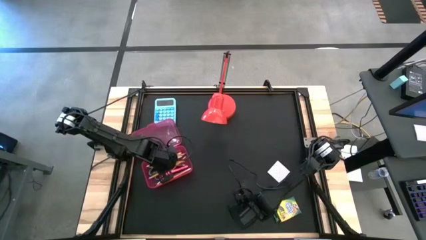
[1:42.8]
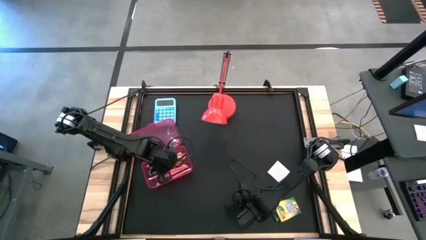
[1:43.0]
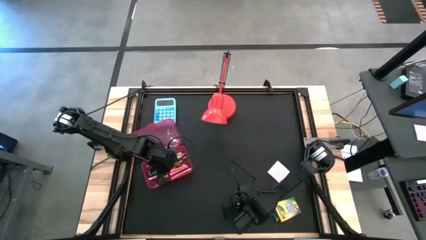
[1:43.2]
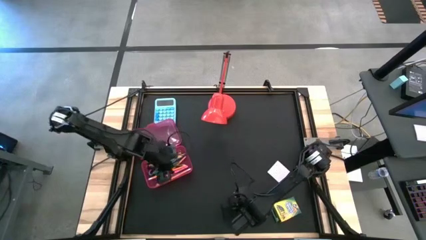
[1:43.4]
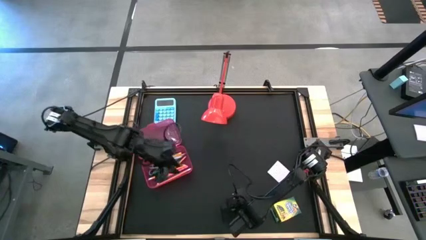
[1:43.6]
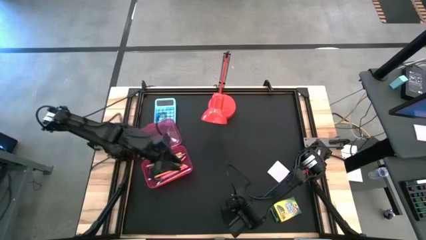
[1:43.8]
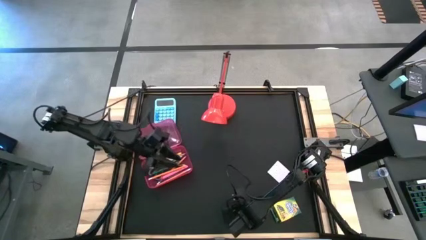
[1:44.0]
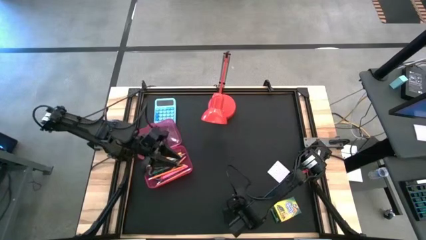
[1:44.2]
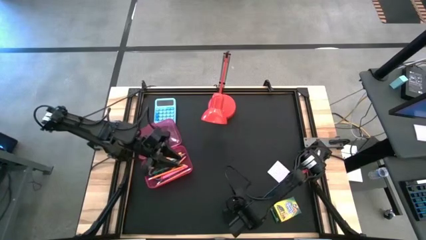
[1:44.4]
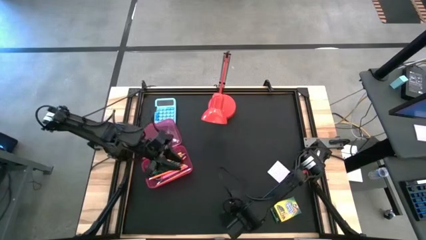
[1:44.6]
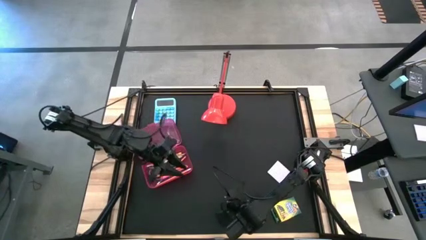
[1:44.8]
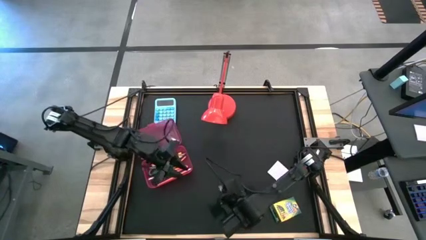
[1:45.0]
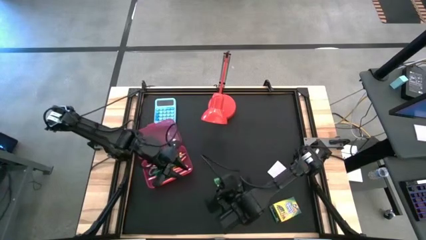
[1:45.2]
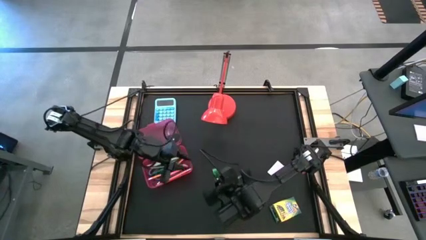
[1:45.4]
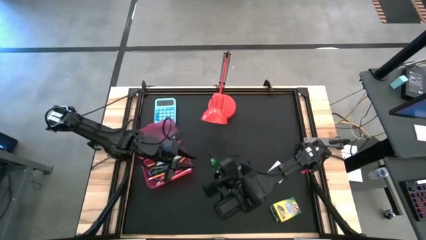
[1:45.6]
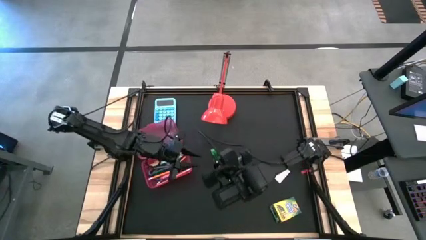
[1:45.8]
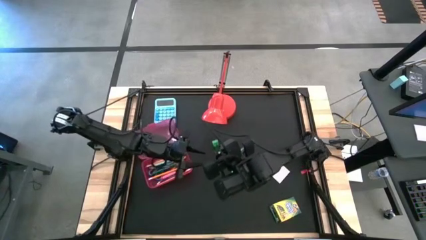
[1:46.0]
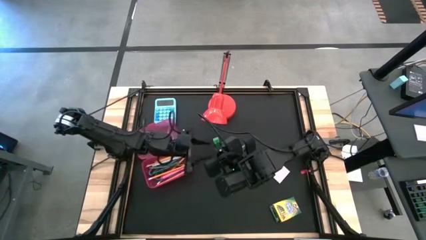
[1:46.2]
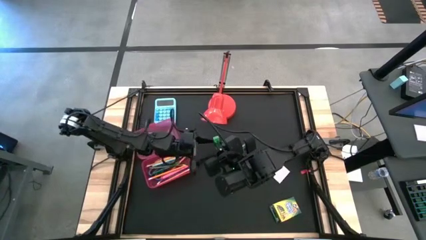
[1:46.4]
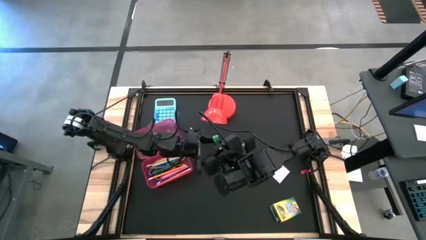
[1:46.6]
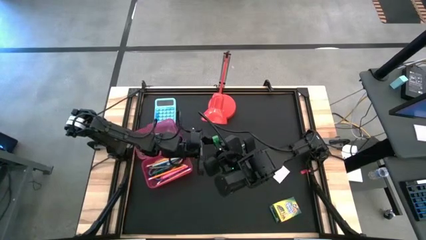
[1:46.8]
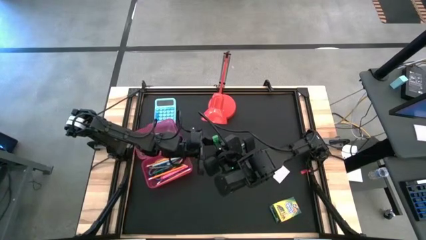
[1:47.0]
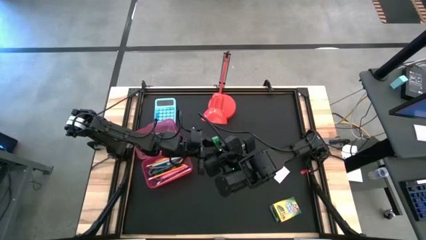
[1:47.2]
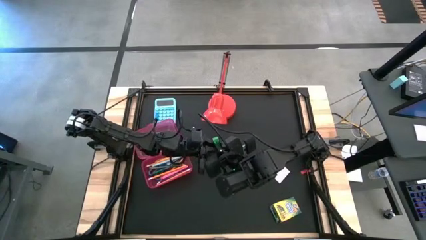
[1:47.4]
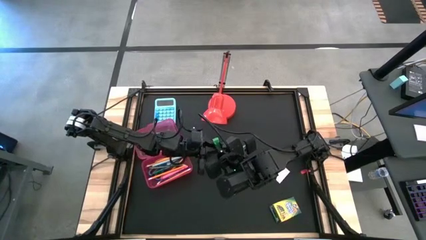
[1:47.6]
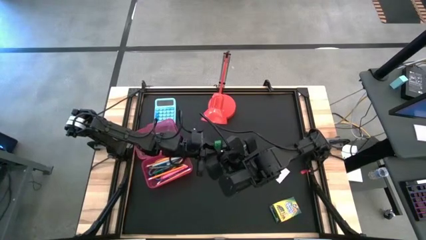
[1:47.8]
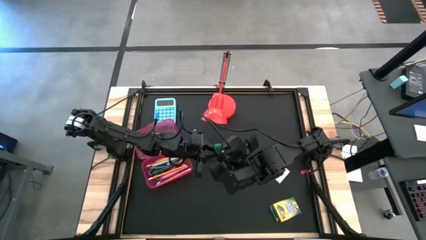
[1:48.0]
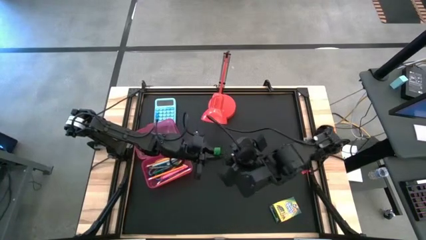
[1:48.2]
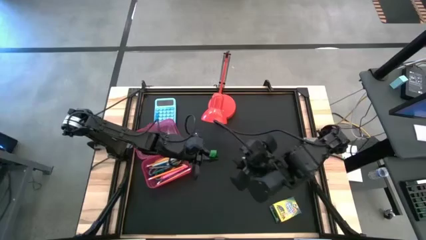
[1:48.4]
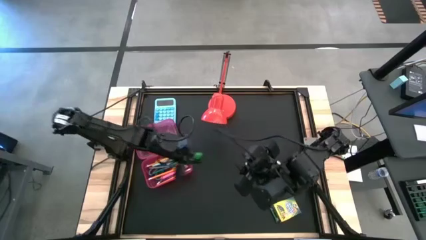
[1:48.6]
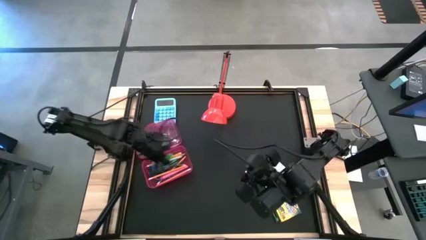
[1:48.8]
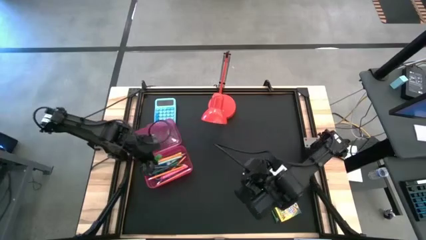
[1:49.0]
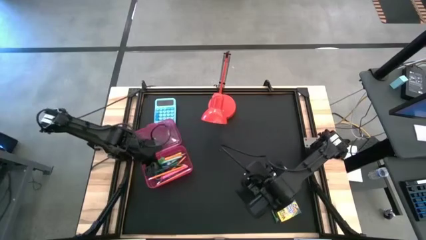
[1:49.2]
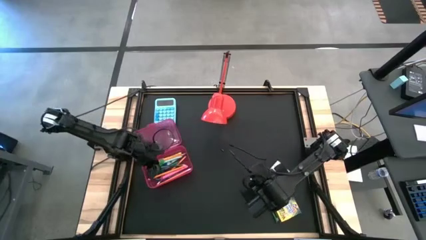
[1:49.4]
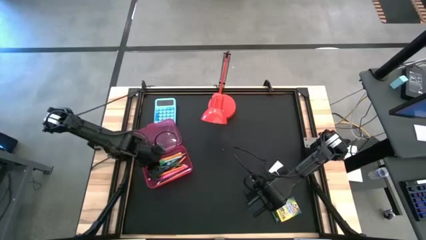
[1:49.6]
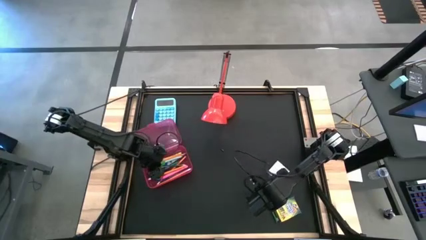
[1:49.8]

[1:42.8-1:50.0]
Task: Pack school essentials
Put the green eraser into the red supply box

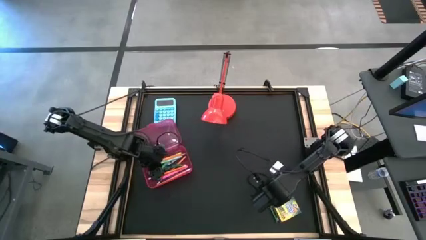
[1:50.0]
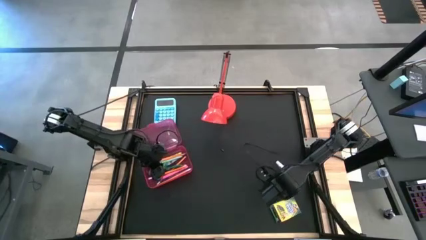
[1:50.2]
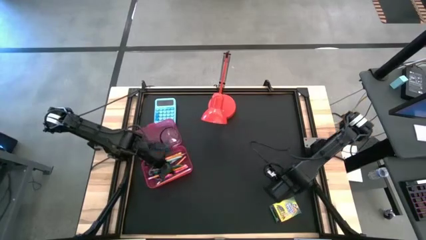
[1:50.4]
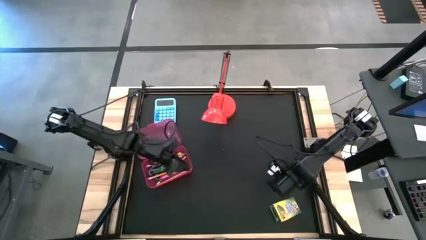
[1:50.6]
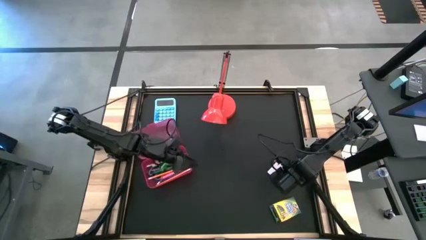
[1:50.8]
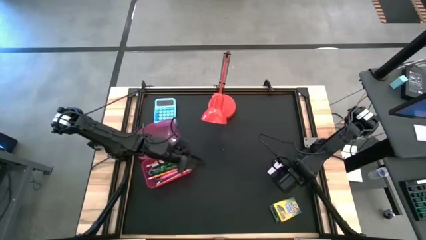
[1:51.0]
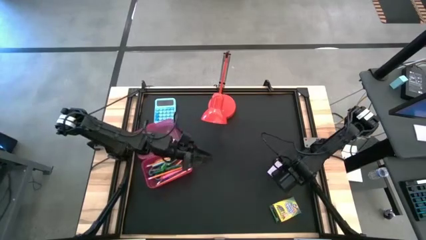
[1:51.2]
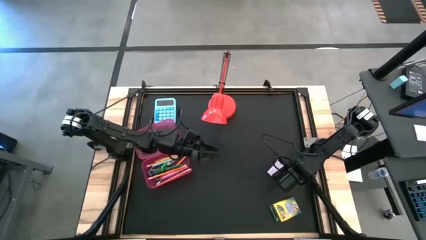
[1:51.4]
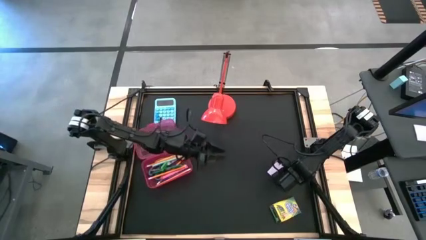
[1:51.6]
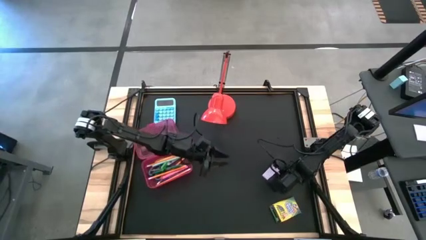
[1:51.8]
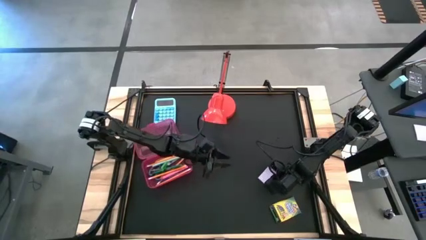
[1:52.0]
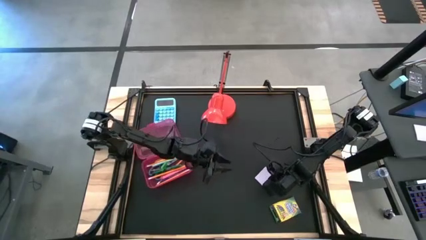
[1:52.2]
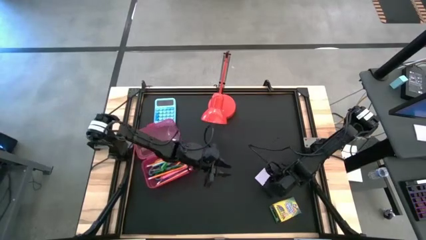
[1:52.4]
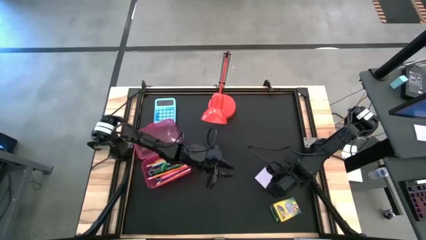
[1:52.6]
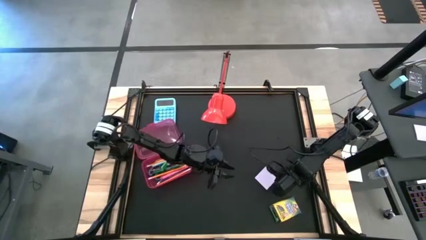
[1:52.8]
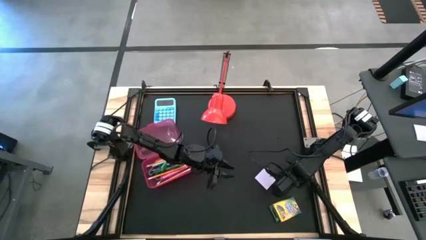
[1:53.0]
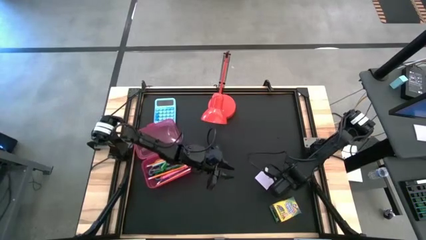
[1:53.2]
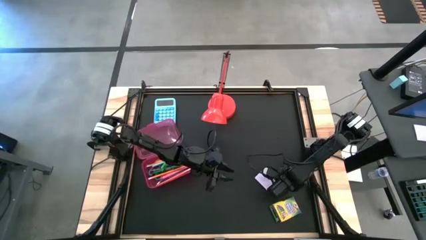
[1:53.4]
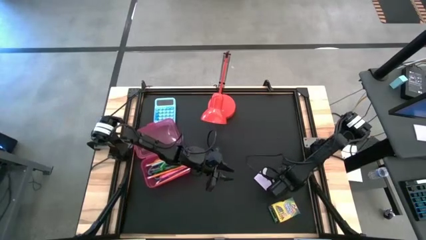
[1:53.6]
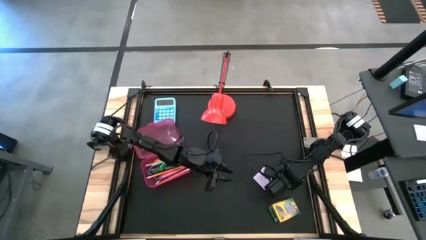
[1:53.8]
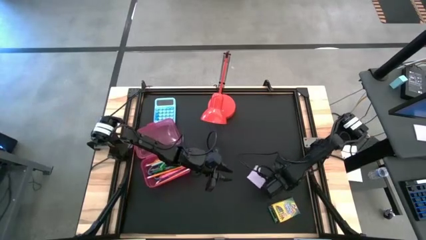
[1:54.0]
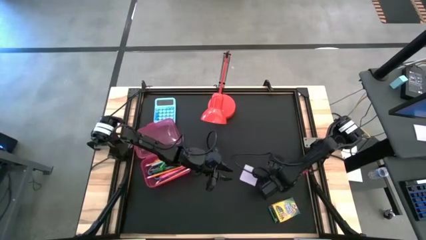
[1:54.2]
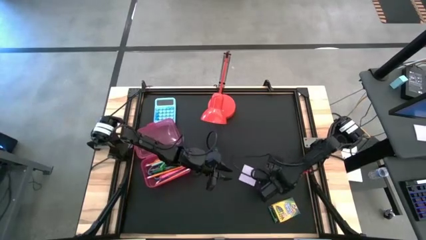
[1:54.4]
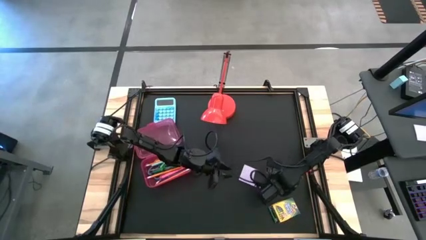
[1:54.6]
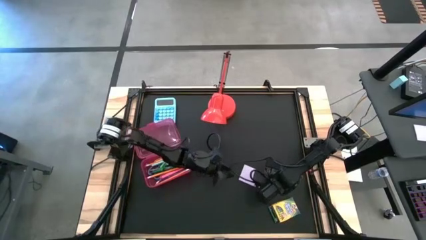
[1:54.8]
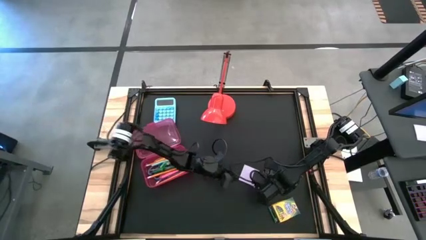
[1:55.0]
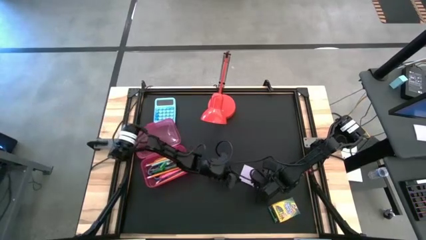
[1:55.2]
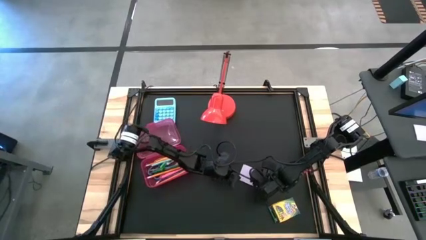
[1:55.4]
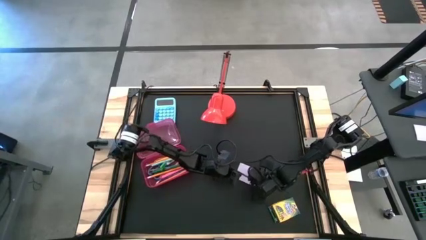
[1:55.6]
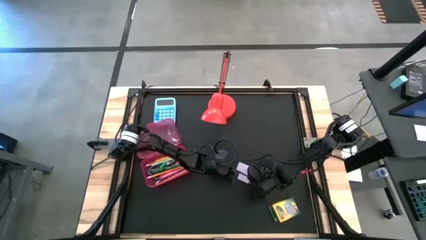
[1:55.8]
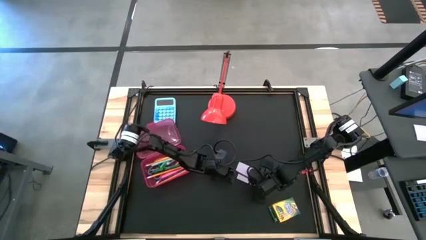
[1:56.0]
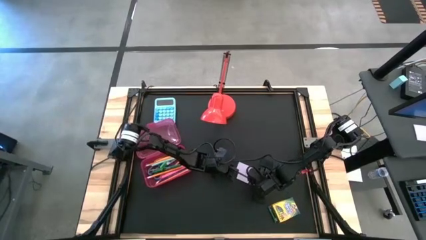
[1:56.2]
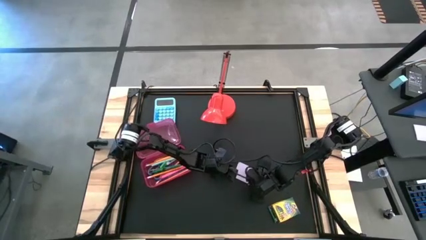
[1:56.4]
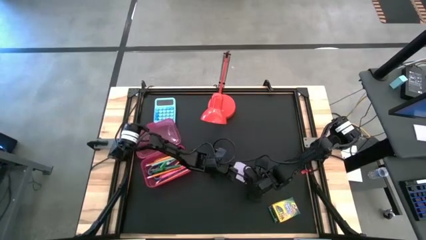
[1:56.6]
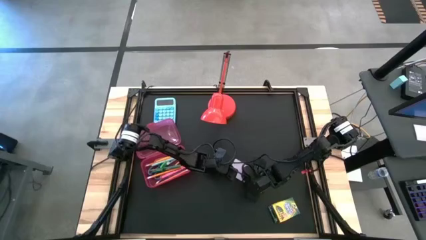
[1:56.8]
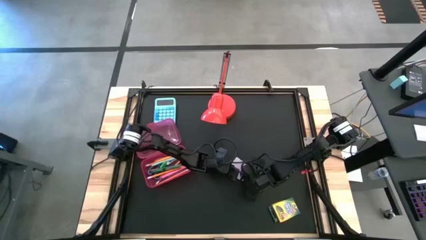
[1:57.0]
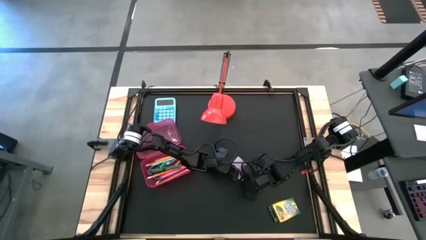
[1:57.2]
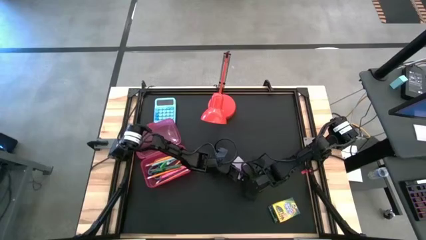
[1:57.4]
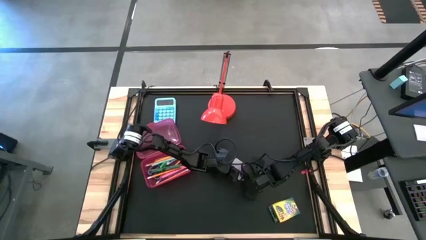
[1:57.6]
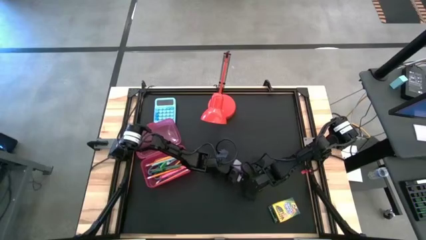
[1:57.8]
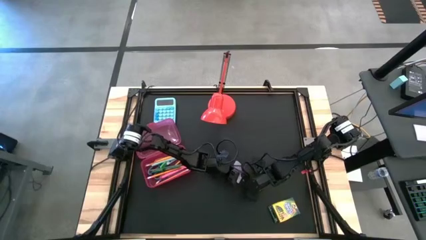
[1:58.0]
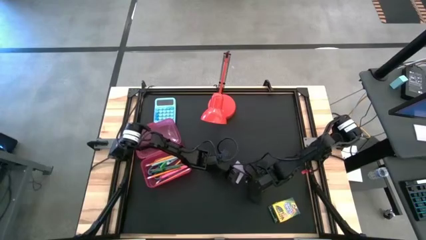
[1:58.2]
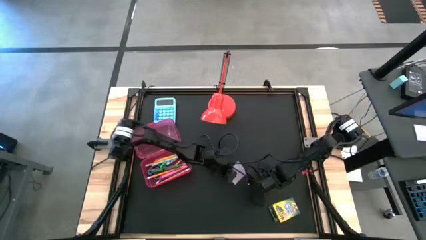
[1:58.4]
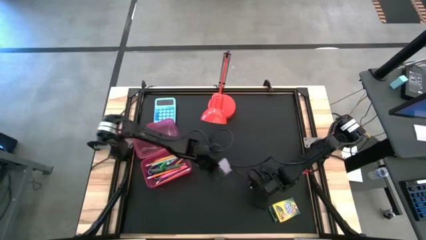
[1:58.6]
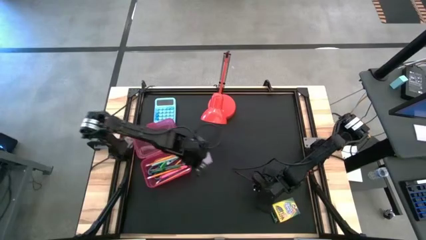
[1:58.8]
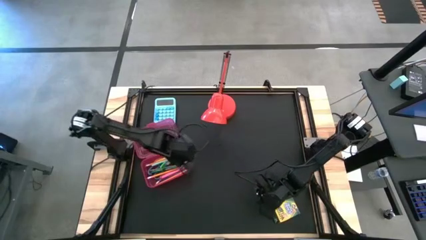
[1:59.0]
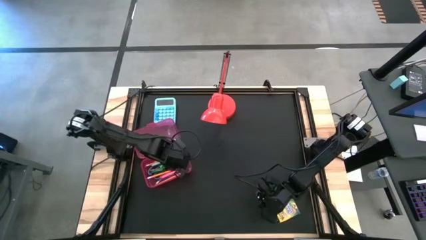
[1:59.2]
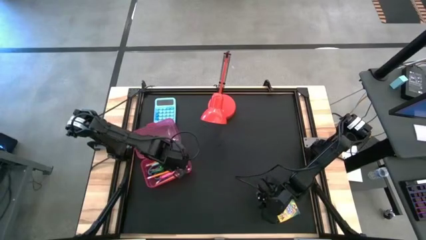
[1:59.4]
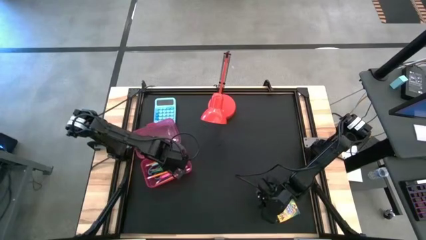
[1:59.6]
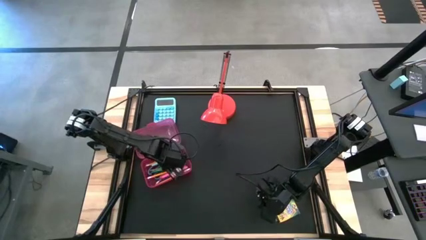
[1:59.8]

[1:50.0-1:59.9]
Put the purple sticky notes into the red supply box
